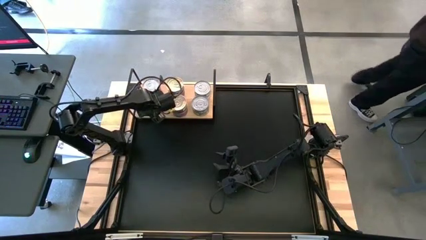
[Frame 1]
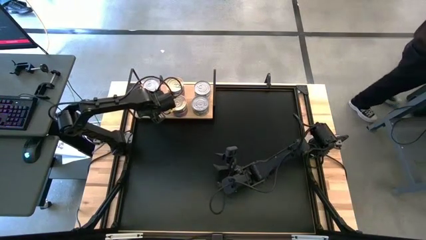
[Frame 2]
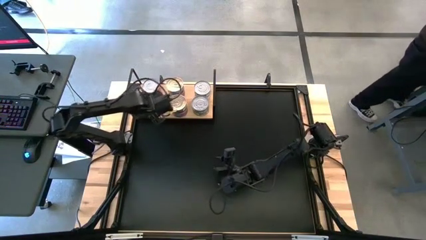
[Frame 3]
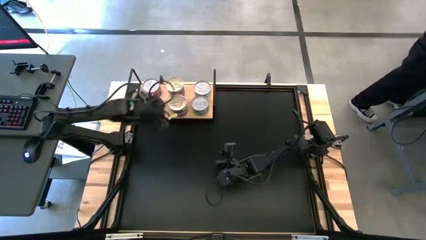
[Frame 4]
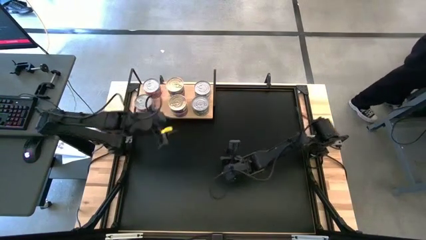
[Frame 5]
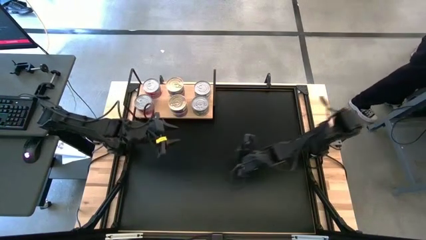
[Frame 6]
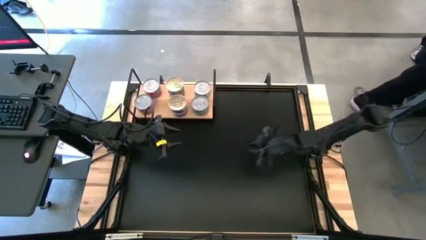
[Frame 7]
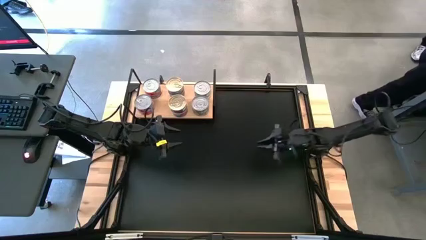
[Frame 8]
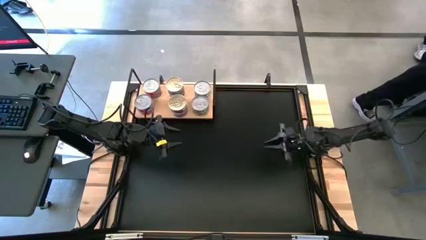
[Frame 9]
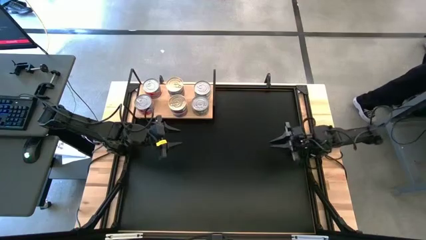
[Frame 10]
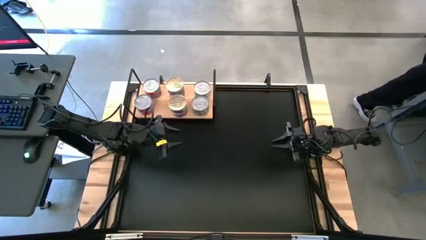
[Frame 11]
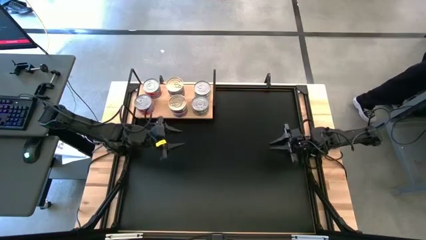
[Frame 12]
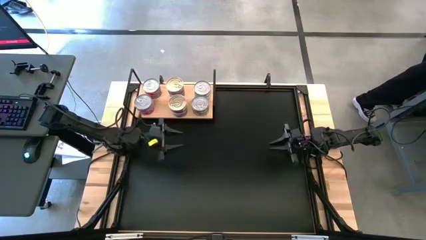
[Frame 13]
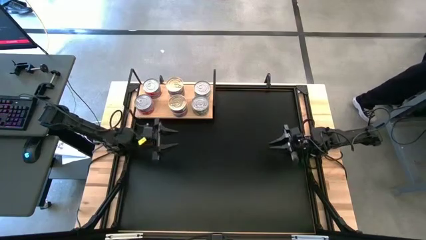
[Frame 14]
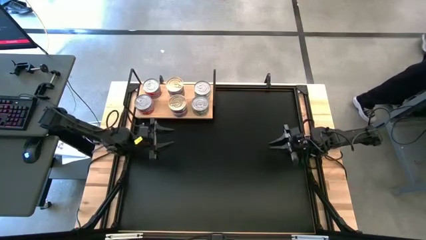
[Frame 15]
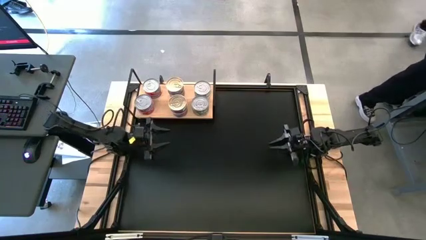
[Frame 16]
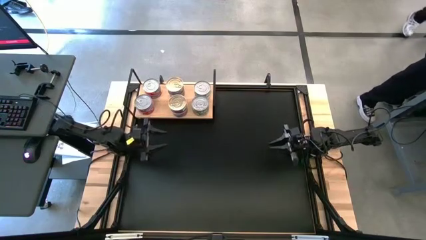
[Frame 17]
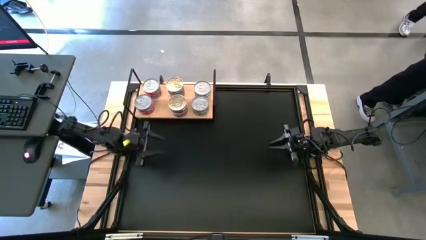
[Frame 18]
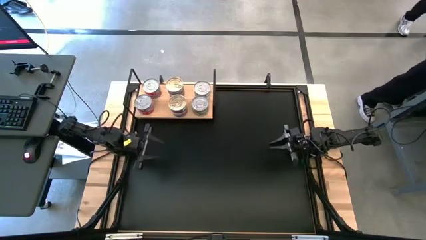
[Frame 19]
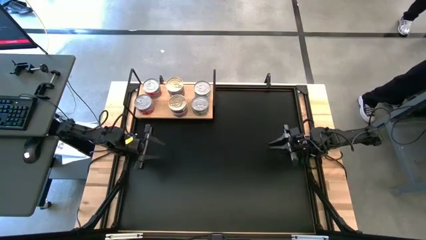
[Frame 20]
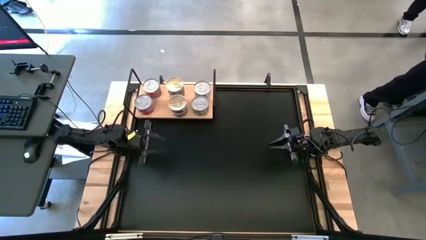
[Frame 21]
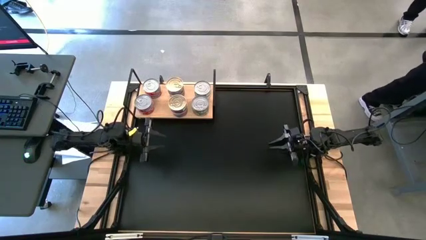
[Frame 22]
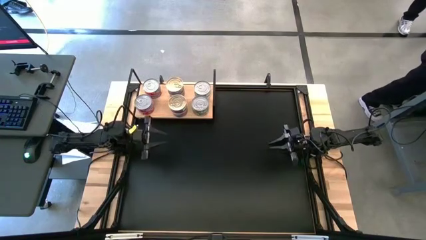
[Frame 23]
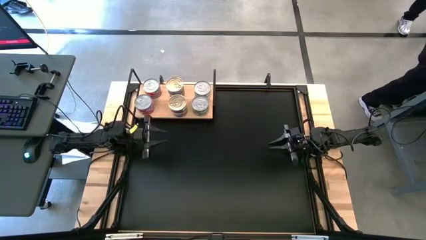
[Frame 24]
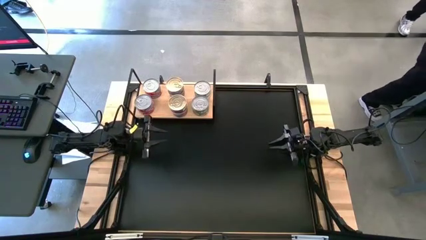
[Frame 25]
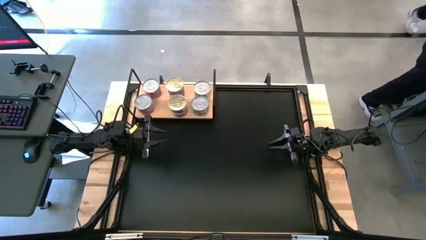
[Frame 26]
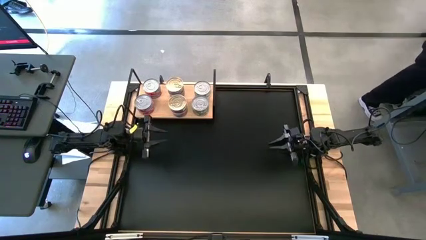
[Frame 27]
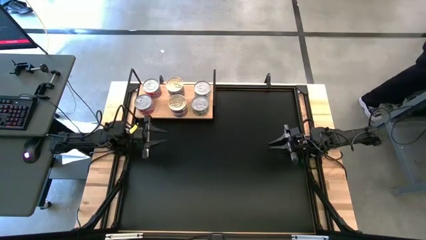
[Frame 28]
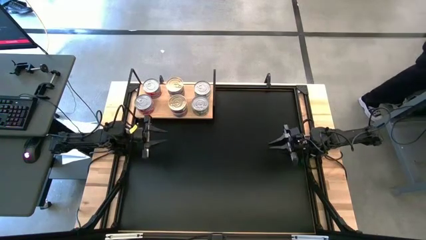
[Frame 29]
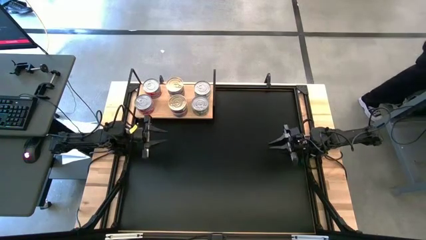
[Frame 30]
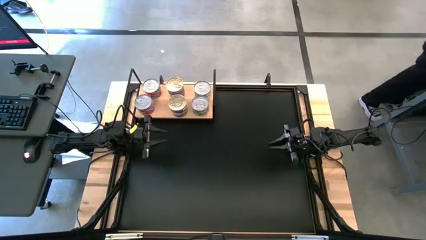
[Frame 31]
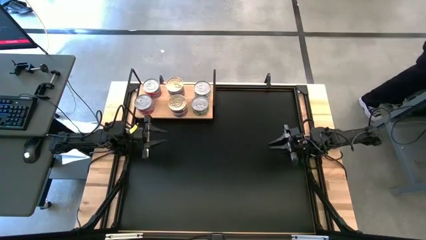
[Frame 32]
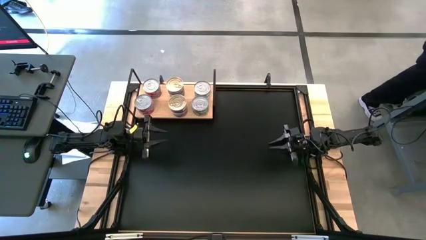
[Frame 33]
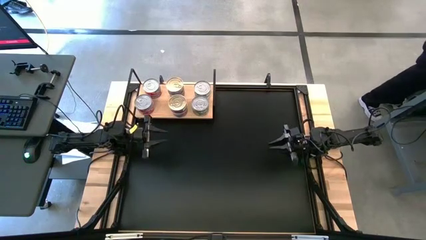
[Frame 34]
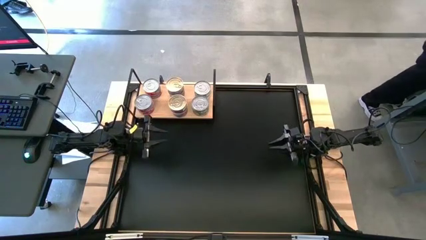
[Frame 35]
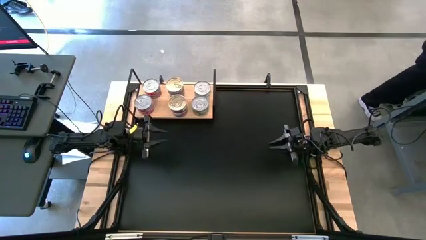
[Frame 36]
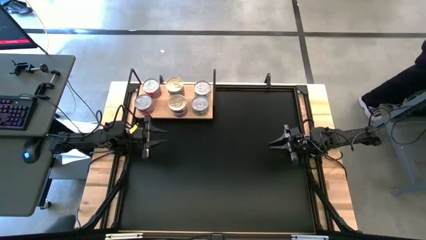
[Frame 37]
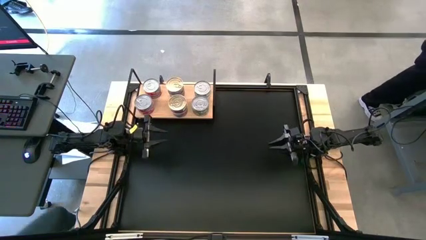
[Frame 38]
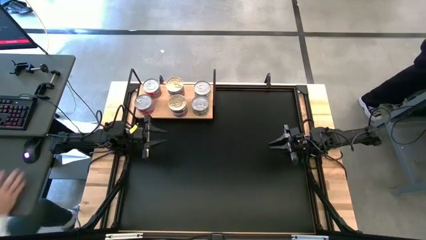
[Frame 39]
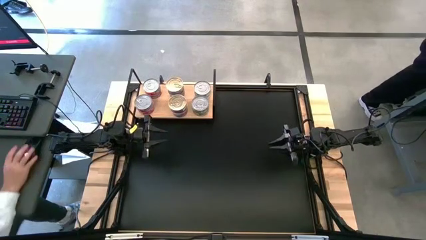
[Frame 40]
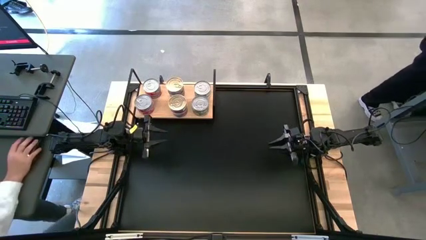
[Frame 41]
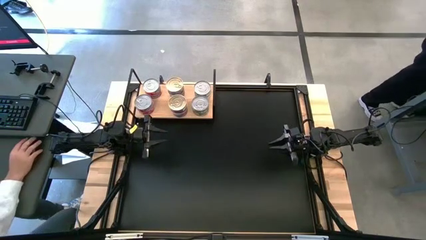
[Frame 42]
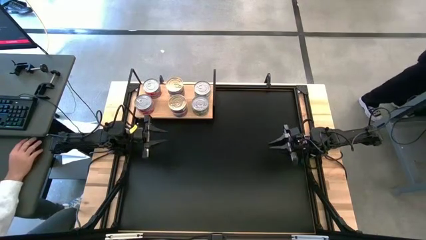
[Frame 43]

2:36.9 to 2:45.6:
Task: Stack canned seafood by type on shelf
Return to Home Position

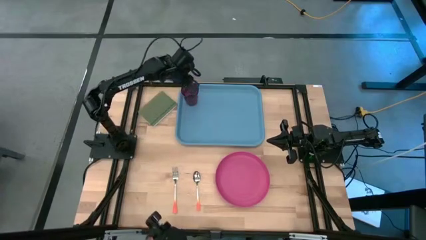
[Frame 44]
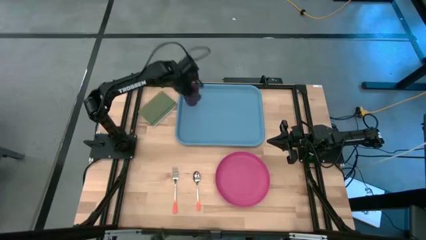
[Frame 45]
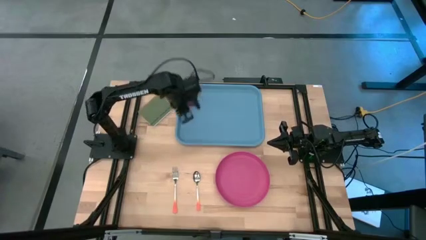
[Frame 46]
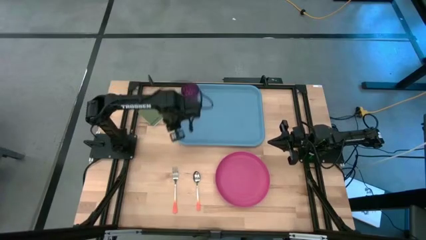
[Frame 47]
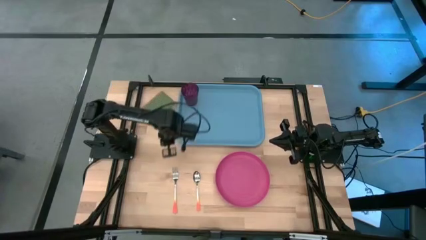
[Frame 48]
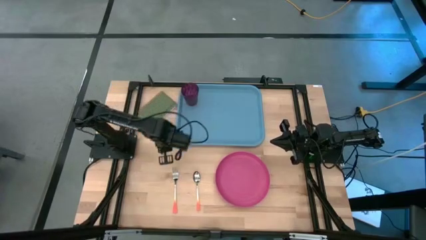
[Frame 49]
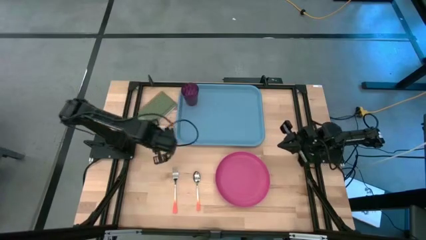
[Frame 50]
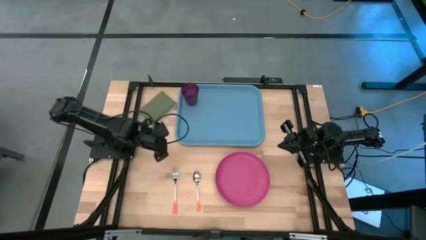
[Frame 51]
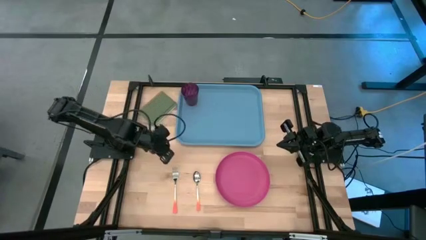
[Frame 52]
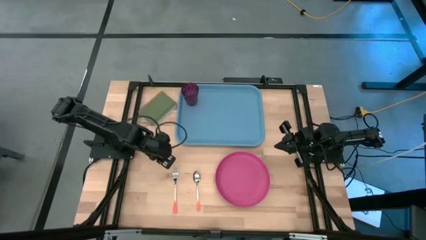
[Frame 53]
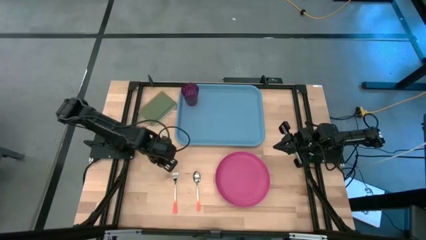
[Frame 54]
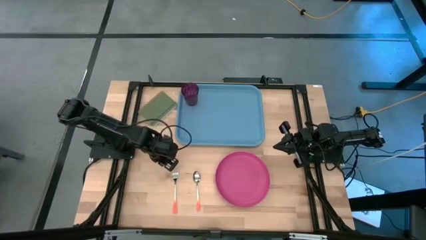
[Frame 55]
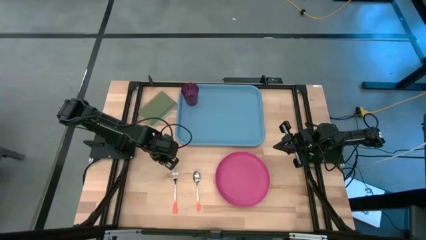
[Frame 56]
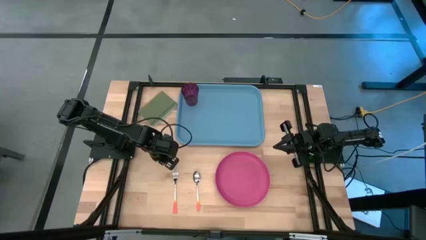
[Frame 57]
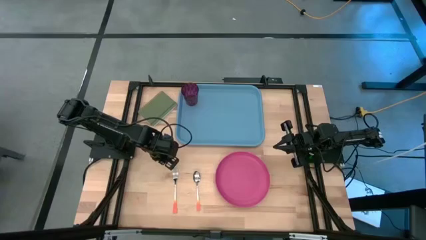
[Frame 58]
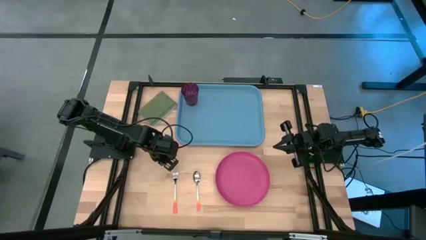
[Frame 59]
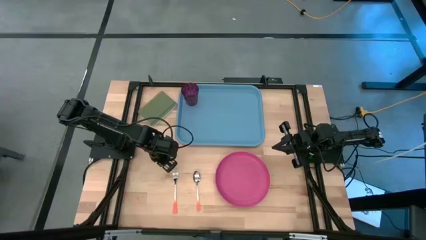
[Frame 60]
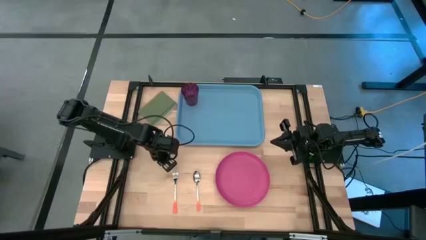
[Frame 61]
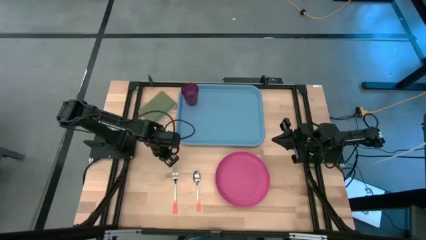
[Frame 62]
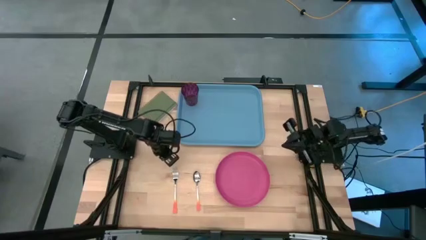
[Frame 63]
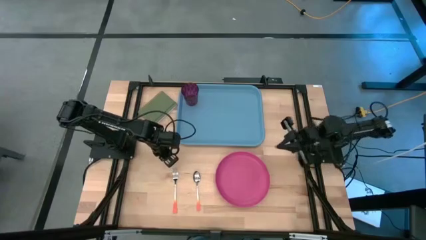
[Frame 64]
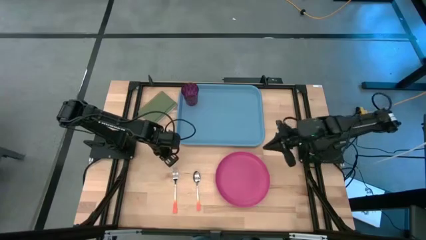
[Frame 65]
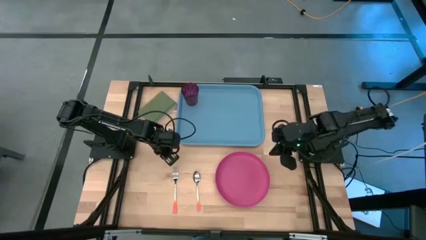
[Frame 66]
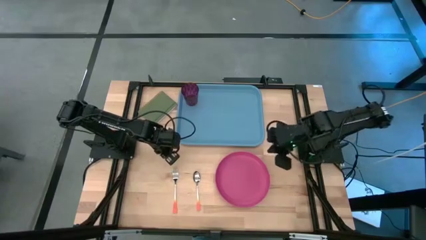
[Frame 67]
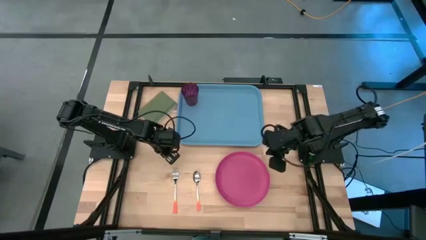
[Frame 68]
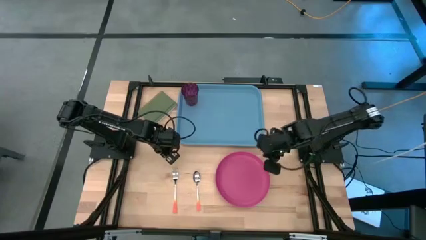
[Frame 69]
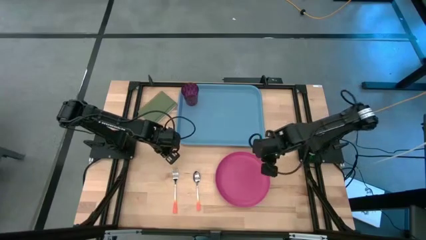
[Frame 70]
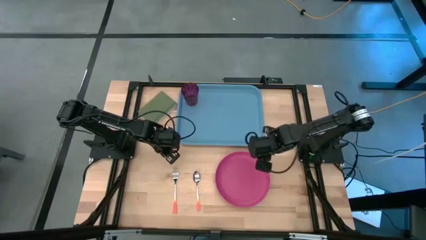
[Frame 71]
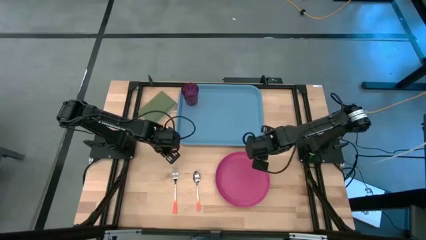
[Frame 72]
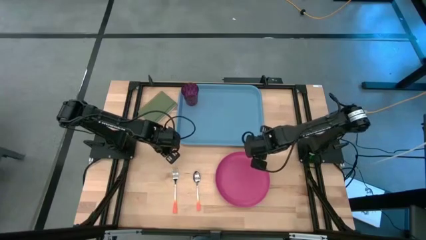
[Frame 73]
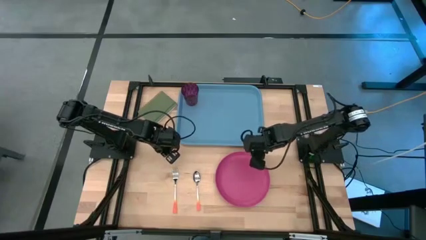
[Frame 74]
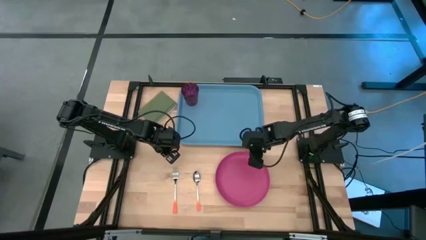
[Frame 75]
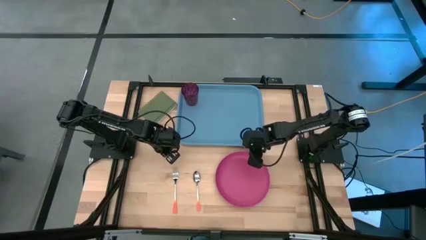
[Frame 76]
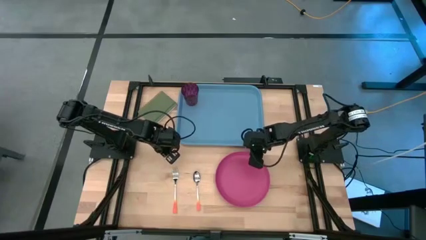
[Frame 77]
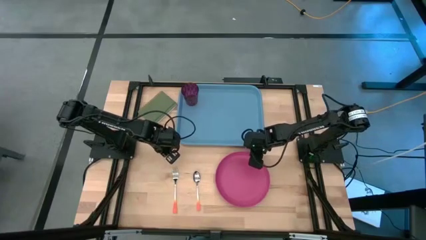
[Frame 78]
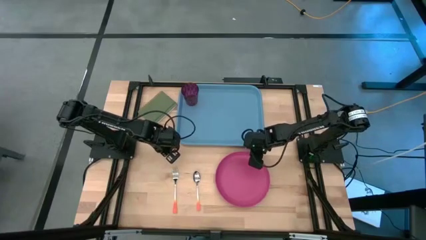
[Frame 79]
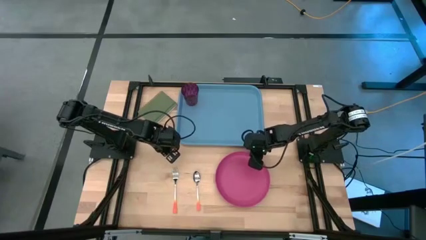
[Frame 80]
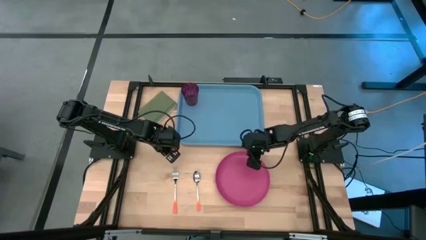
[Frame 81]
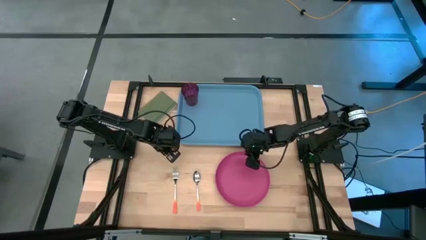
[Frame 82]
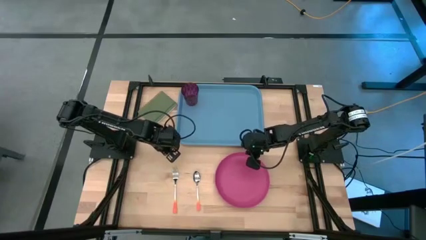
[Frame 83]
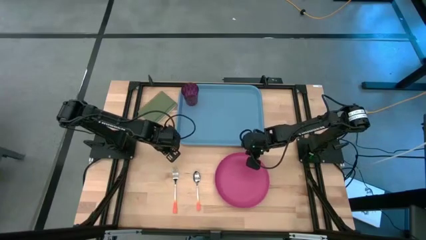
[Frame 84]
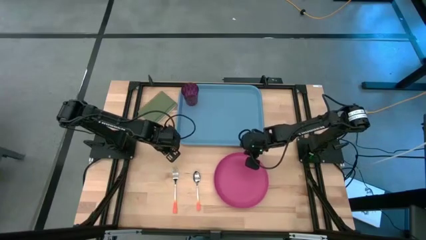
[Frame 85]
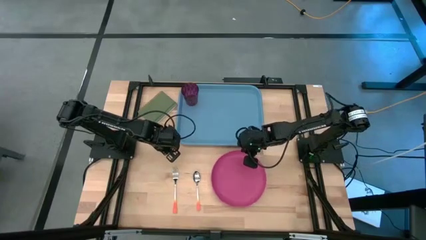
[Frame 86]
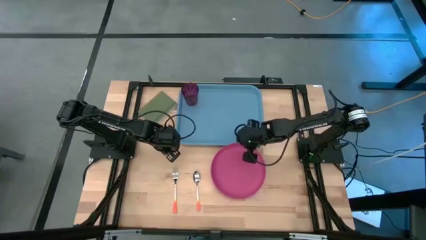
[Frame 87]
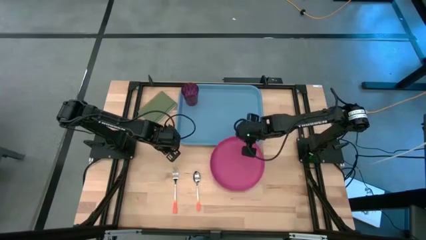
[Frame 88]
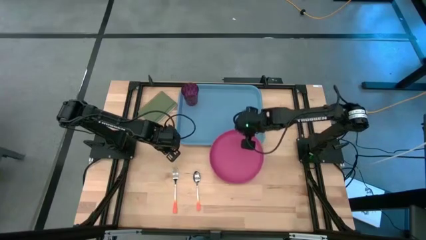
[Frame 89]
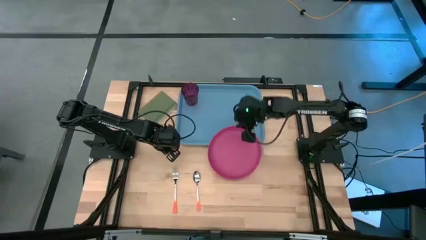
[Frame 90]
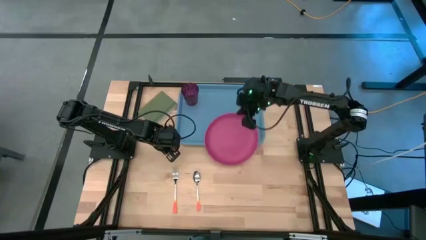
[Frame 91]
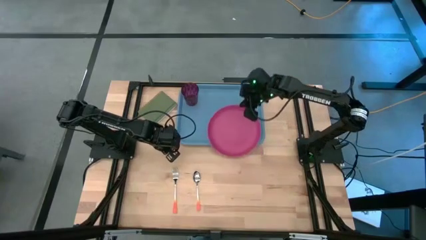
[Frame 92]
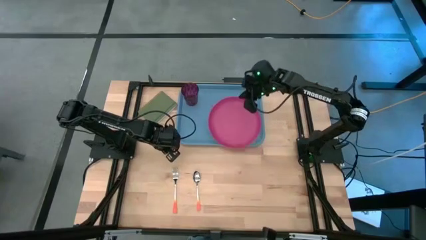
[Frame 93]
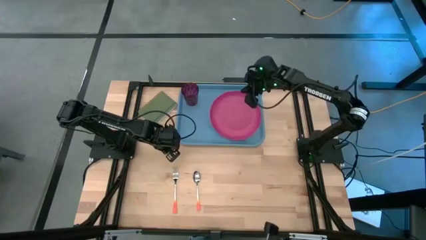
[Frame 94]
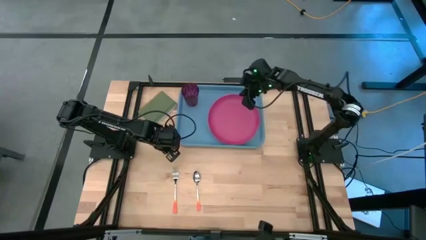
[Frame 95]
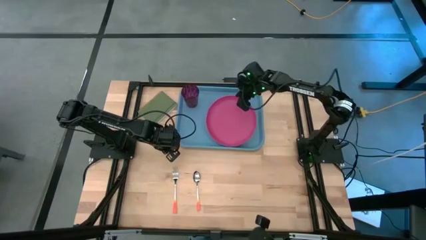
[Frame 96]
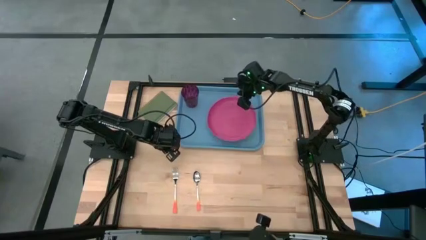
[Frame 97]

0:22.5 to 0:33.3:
Task: Pick and place plate/cup/fork/spoon on tray
Put the pink plate on the blue tray
